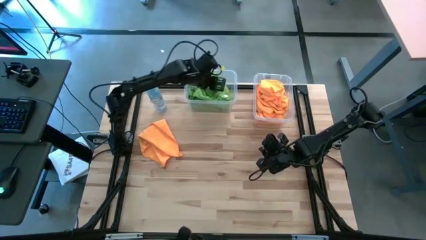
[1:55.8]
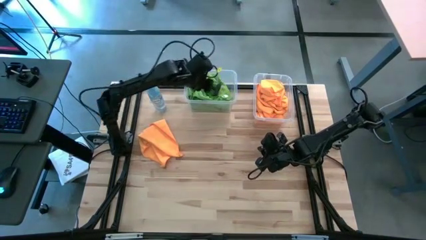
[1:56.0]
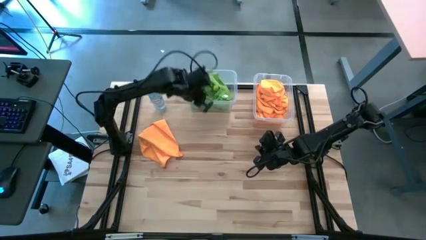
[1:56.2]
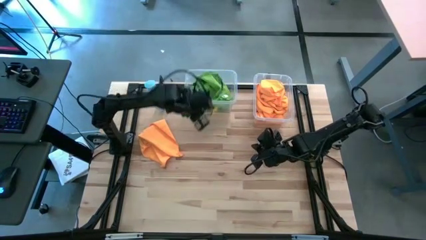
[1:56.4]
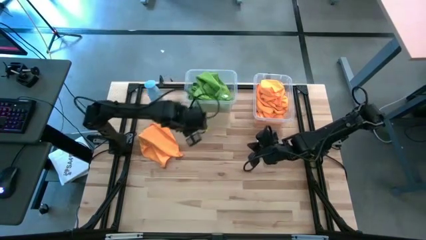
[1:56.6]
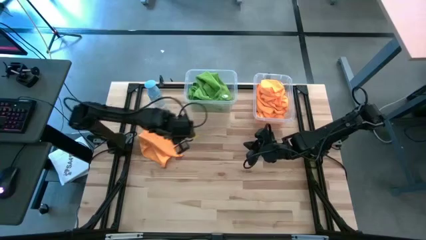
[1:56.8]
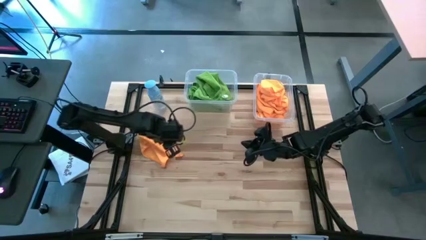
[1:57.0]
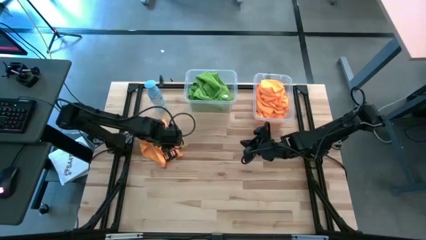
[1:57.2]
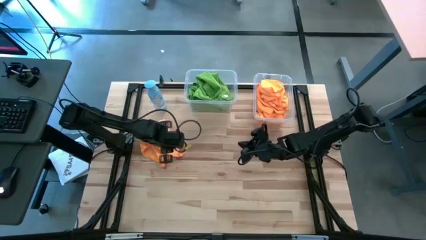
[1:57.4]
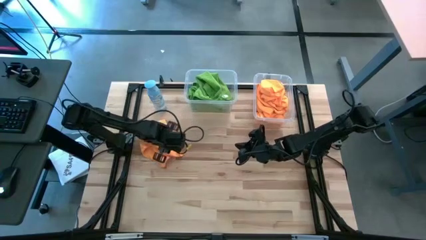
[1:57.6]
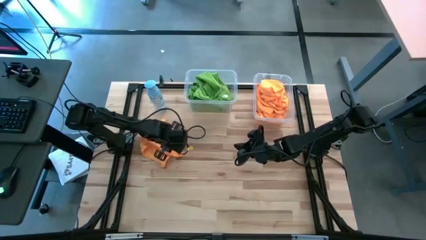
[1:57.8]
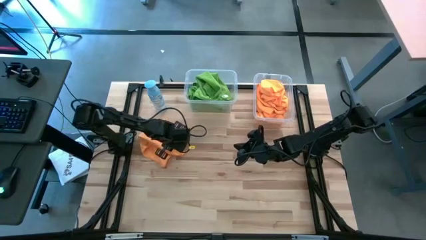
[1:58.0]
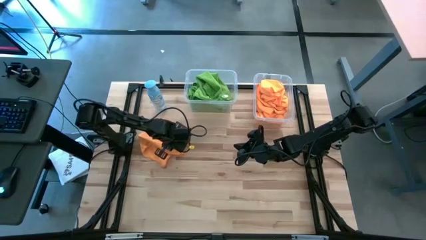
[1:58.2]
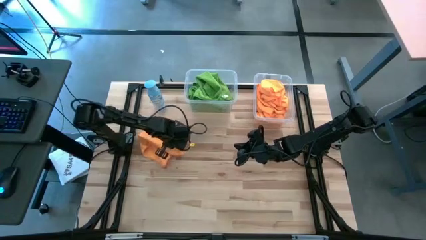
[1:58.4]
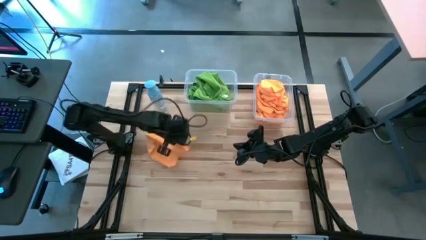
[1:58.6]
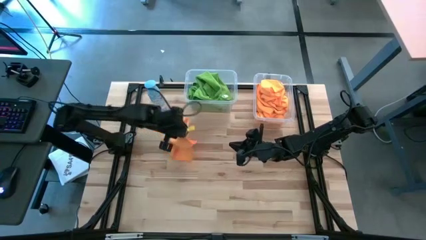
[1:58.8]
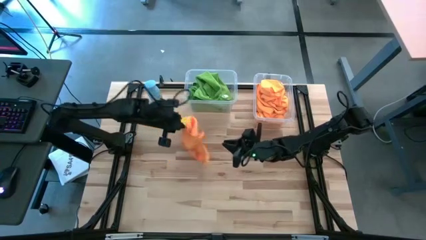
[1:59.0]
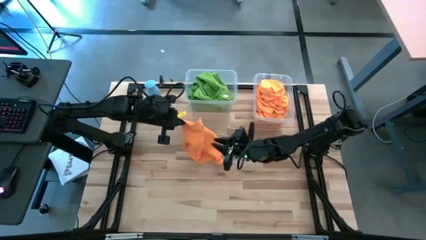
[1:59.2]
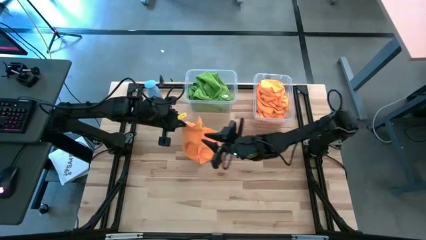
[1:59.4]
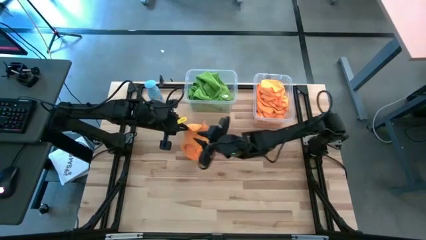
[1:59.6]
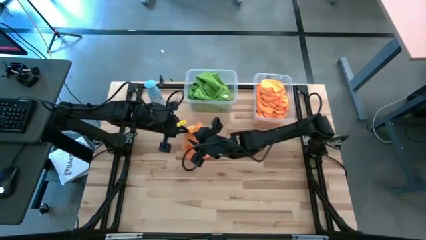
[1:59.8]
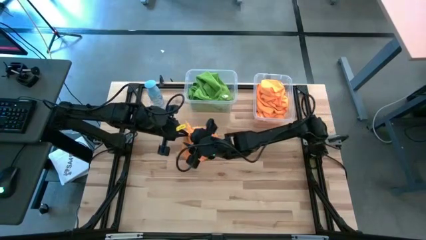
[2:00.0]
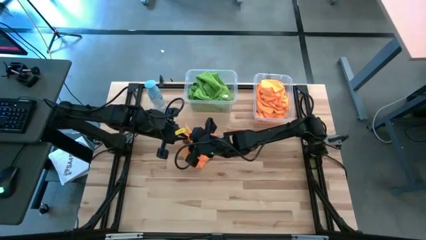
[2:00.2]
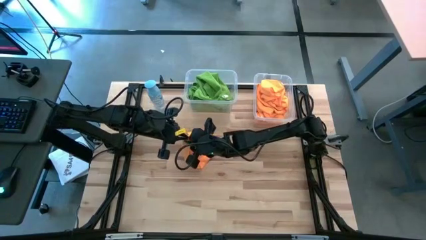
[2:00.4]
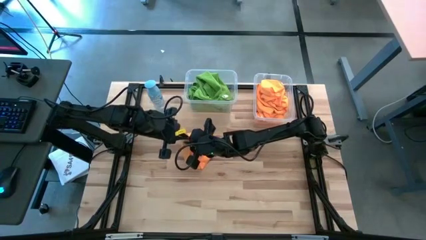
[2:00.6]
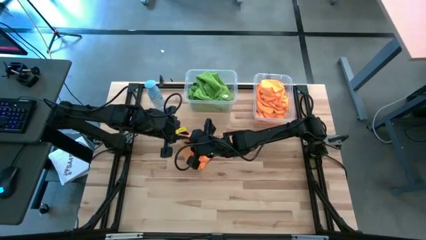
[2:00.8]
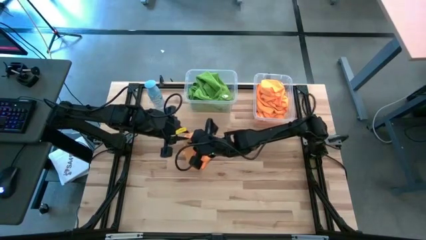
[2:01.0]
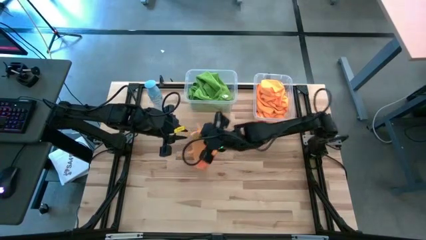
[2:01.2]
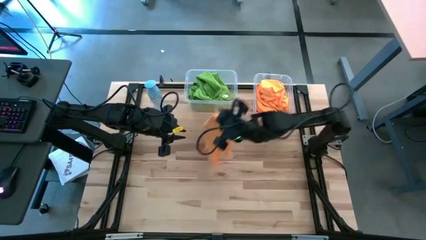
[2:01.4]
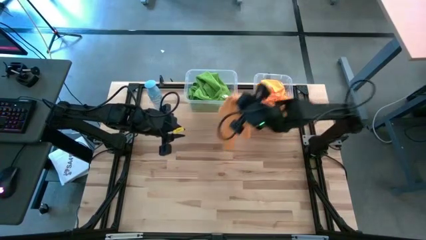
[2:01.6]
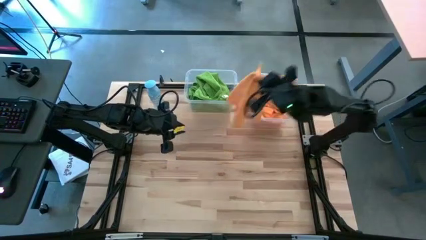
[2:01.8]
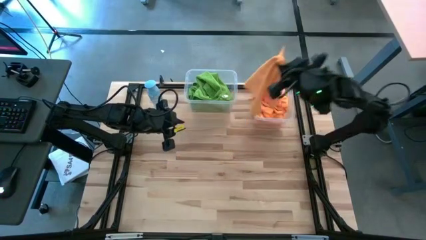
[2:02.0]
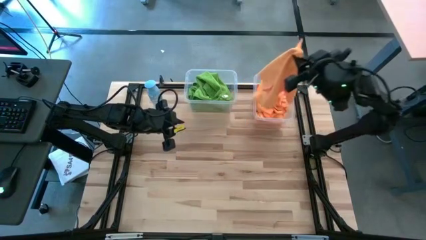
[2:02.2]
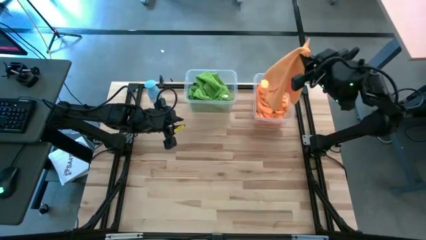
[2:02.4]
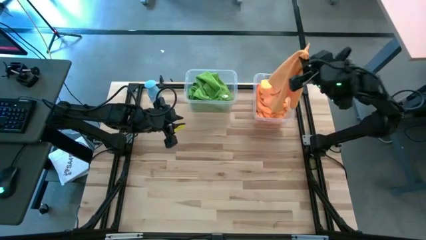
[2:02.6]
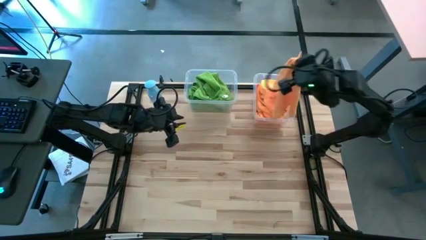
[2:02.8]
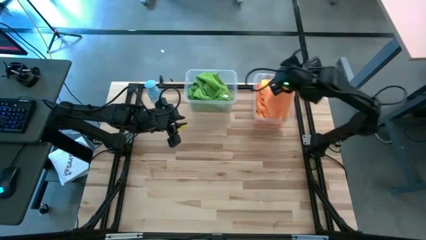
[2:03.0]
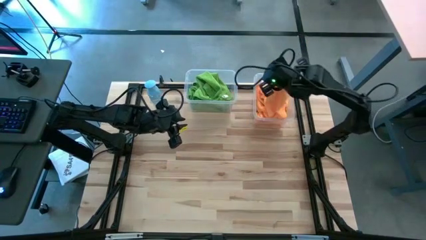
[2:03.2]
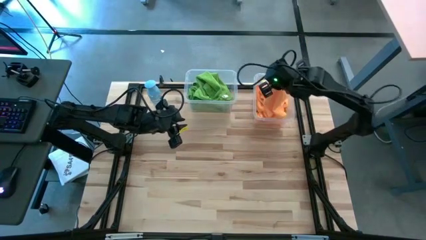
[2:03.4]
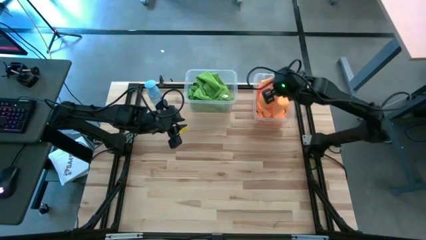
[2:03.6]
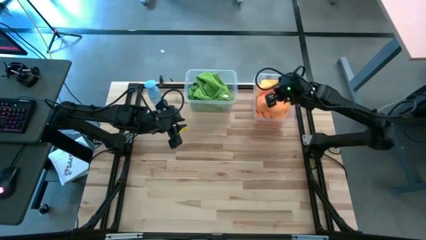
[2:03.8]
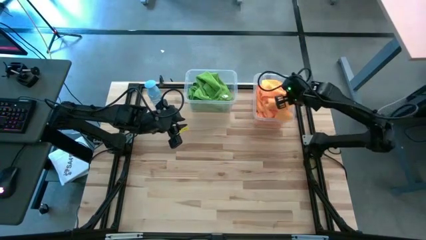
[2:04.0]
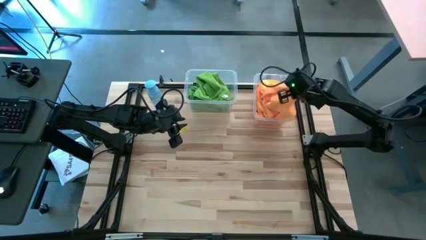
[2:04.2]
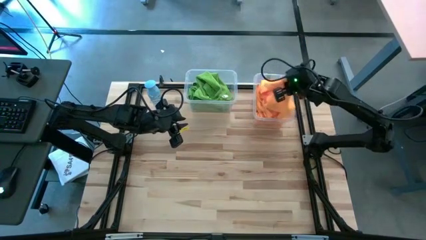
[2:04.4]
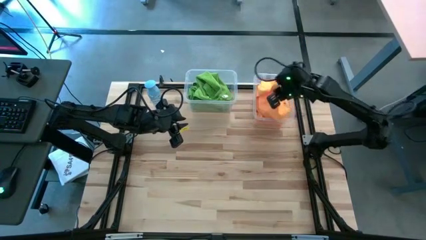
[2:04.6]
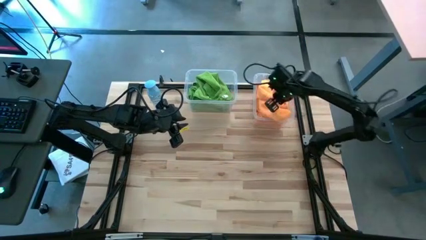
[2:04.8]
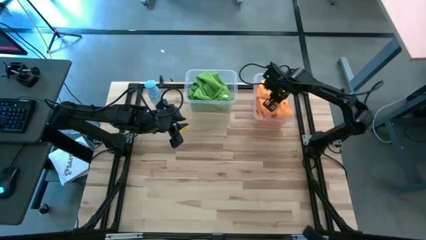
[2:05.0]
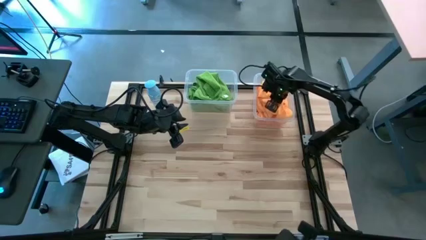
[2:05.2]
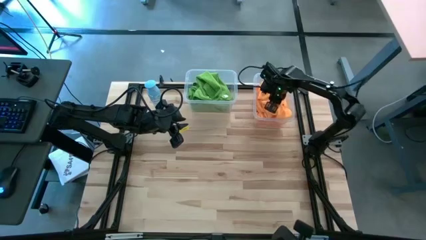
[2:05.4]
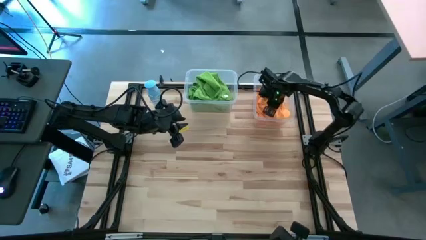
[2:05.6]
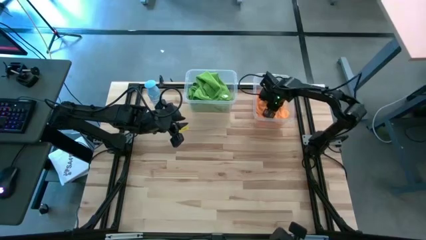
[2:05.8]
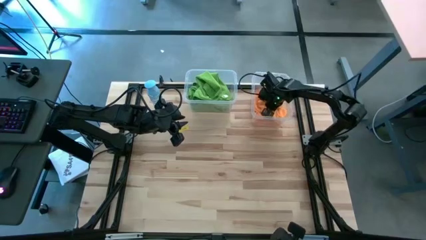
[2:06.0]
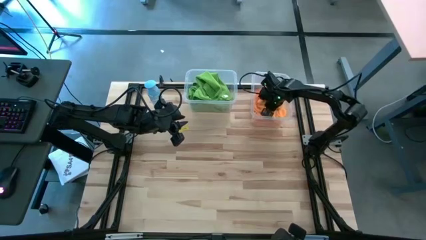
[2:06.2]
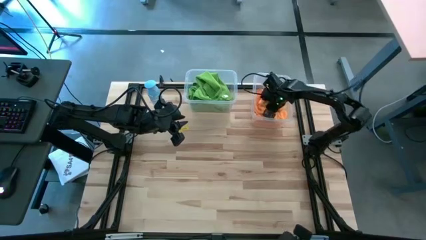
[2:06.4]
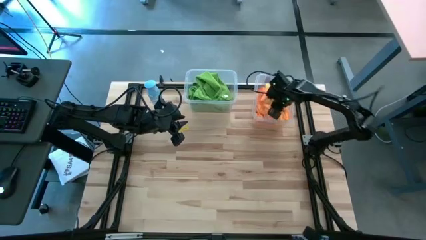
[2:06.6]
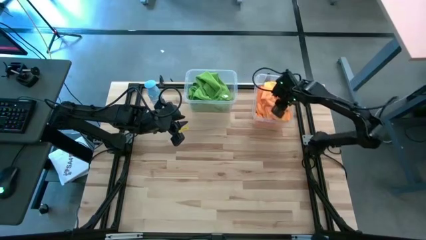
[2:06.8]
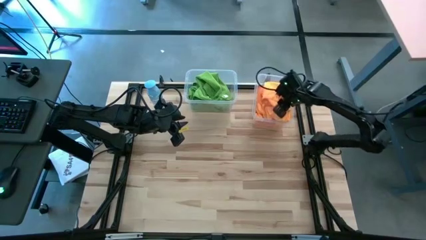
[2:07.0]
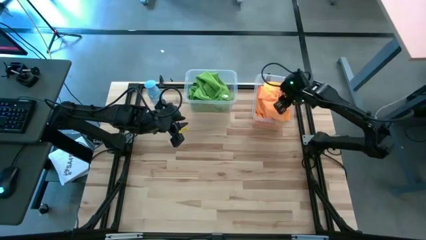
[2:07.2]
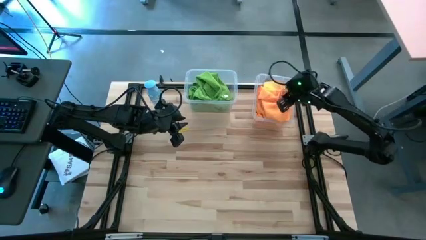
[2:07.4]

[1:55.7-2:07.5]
Task: Sort microfiber towel by color & place in baskets
Put the yellow towel into the right transparent bin
